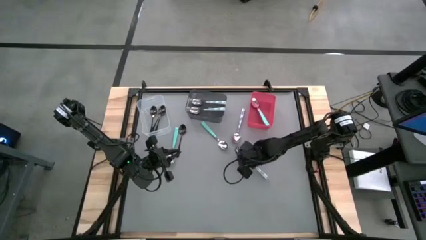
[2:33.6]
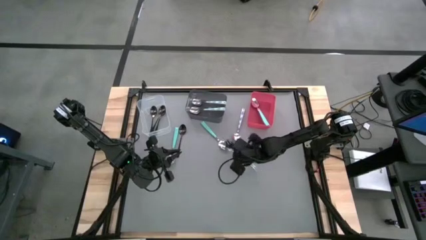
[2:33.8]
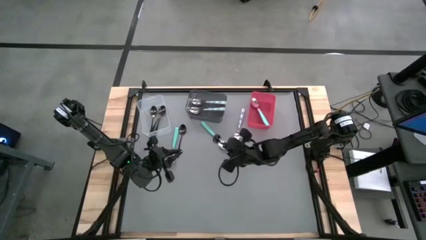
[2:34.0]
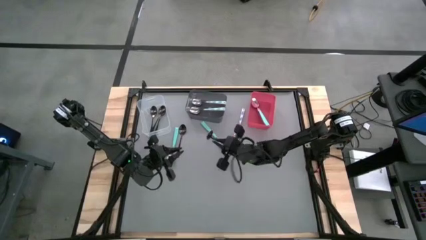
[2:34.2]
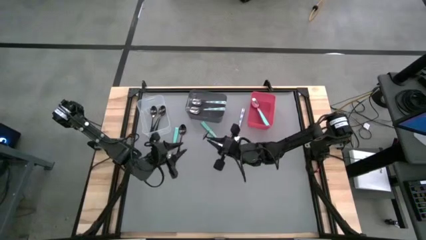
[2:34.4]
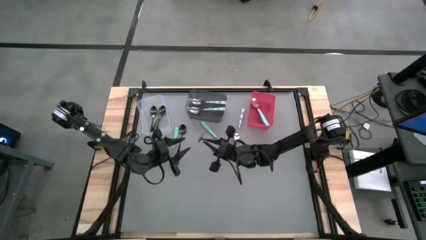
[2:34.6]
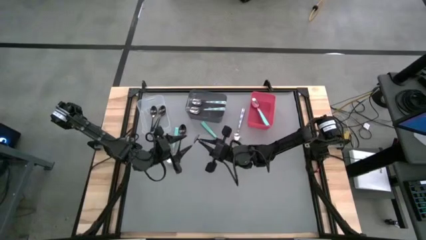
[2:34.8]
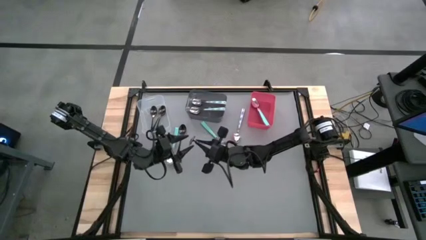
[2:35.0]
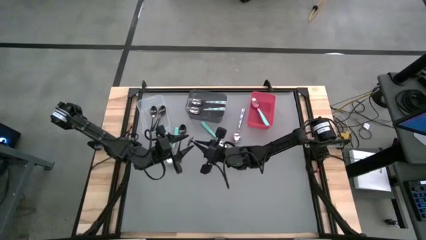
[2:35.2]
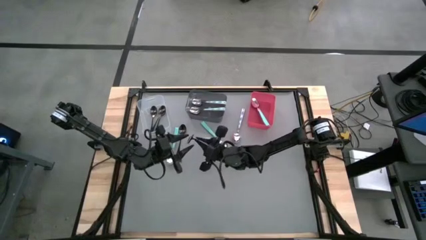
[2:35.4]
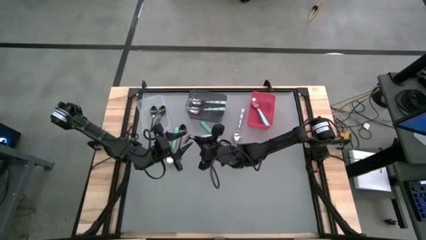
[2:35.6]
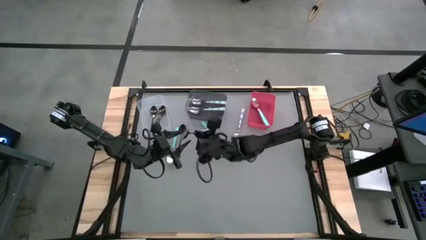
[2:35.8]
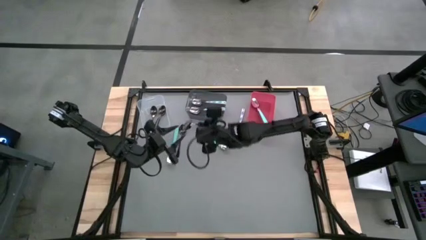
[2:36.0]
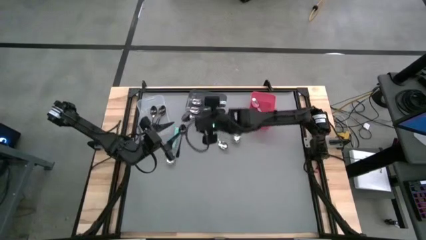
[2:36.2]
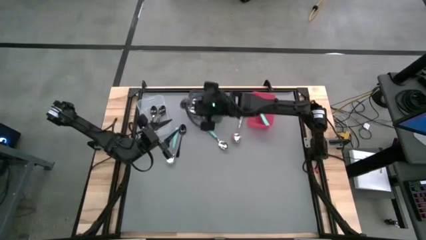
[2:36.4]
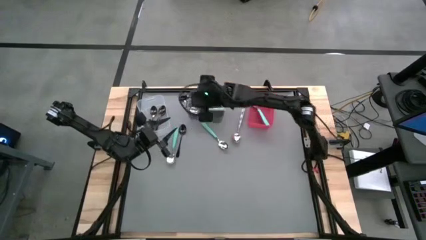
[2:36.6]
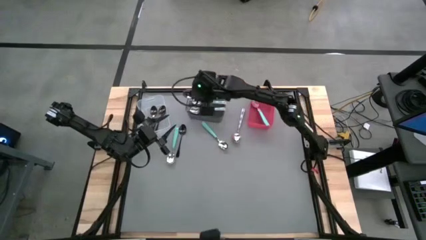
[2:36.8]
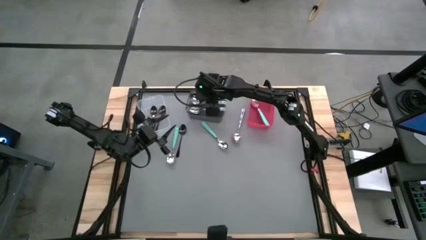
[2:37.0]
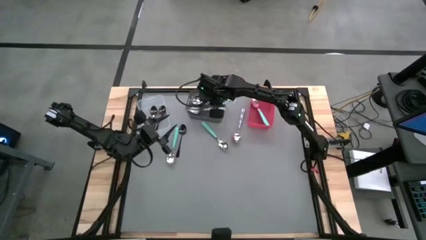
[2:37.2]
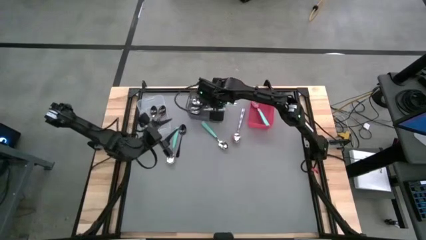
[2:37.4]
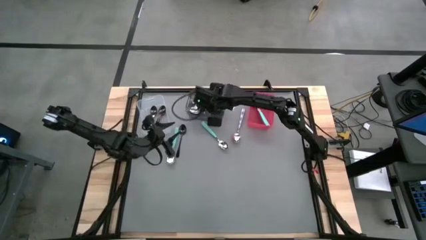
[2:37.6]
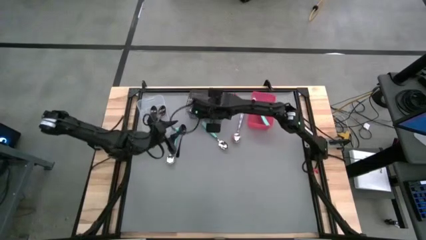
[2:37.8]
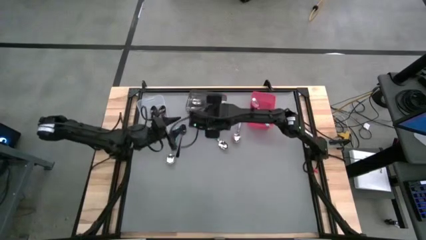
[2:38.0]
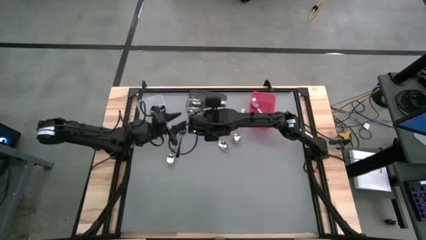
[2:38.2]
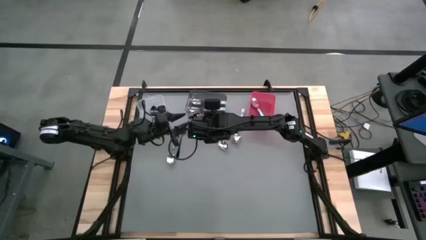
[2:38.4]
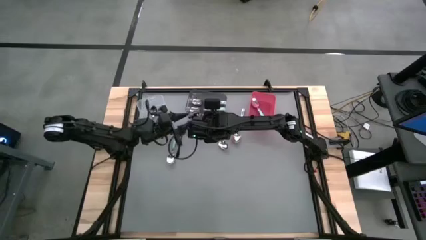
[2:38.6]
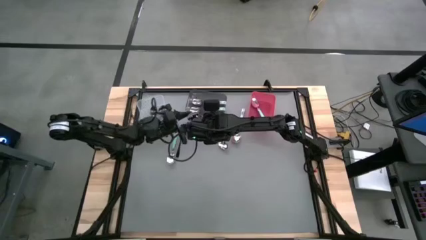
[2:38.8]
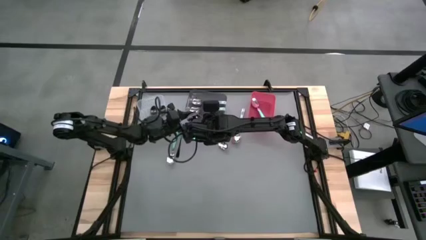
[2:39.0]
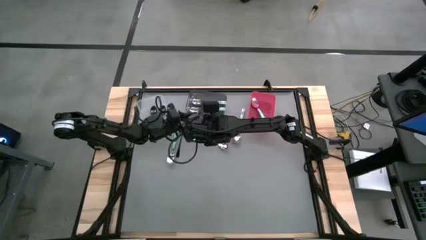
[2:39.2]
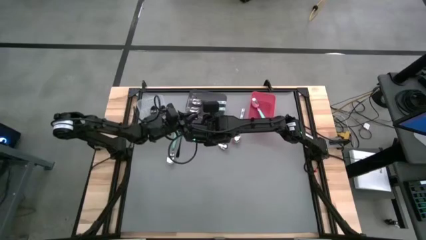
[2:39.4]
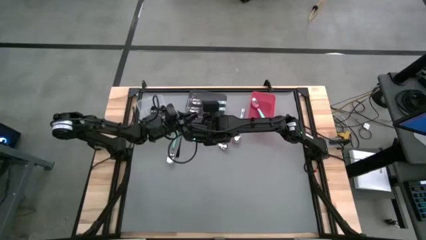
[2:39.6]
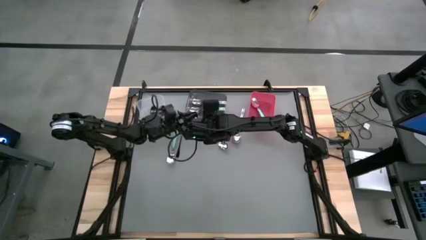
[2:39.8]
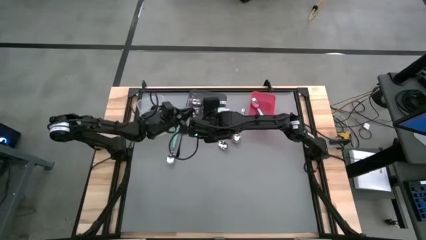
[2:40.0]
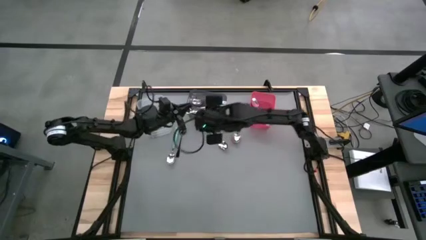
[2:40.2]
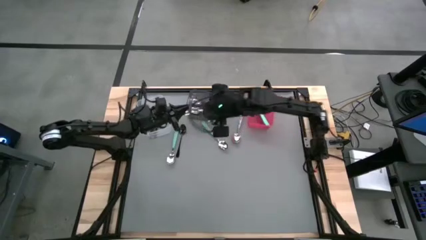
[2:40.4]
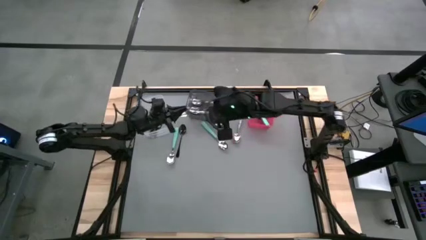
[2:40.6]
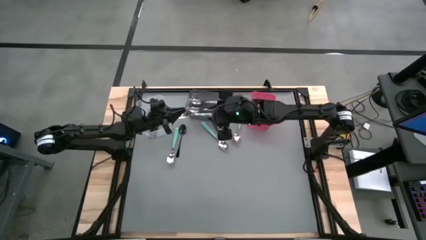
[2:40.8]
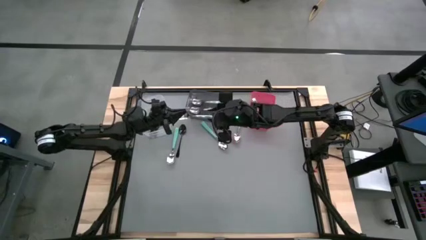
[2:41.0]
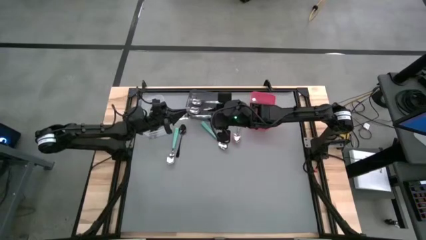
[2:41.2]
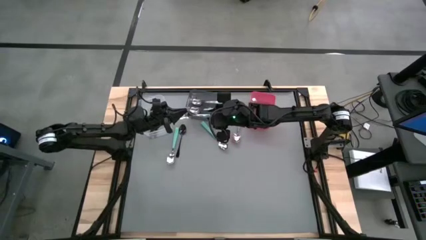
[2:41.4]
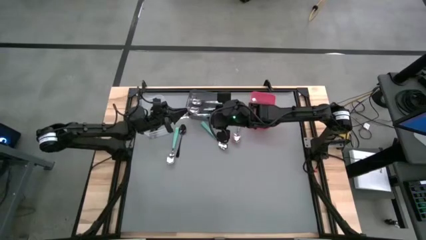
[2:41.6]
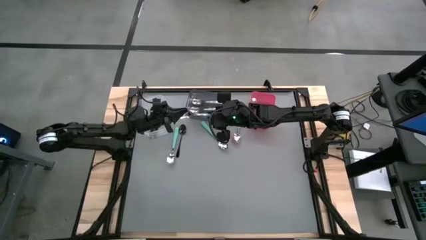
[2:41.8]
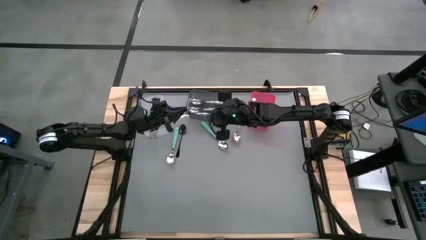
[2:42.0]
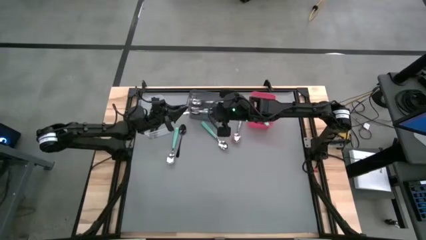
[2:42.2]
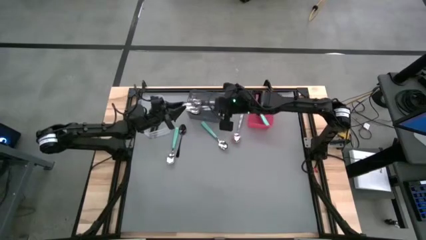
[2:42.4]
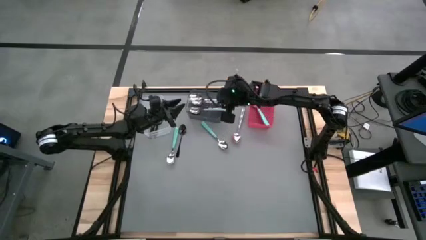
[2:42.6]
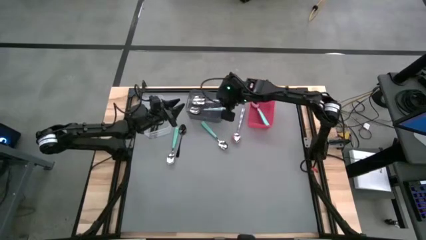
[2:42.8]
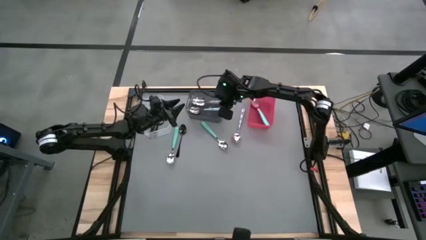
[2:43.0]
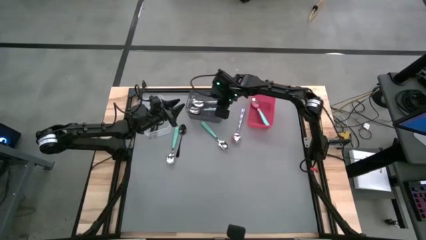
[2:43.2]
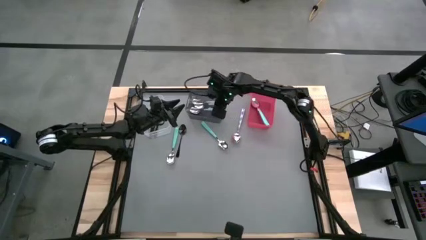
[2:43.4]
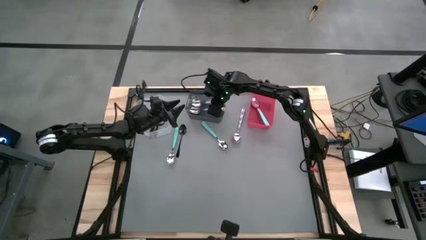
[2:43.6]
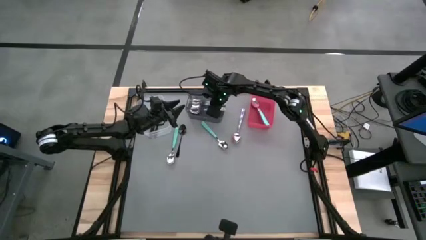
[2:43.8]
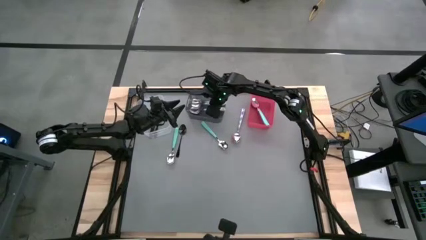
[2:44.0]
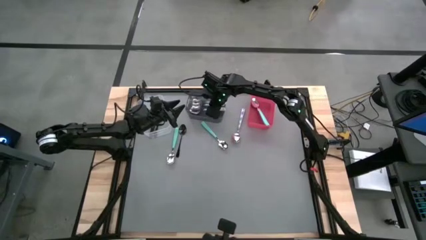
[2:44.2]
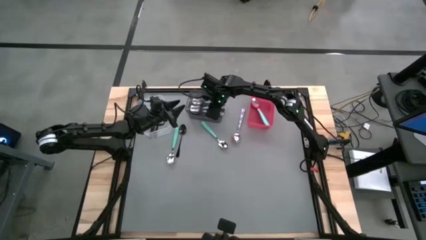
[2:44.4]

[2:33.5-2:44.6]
Task: Sort silverware by color (type)
Put the bottom blue patterned spoon into the black bin

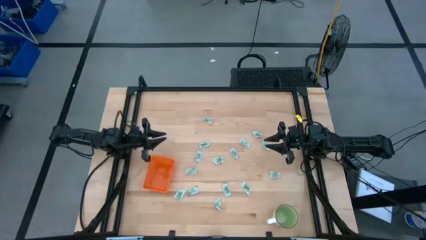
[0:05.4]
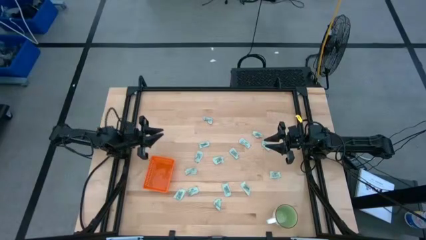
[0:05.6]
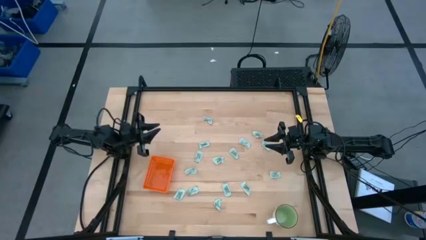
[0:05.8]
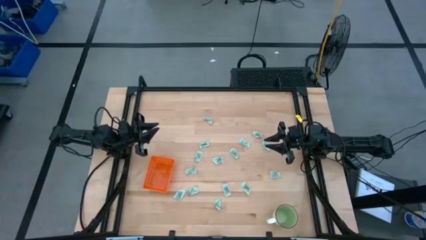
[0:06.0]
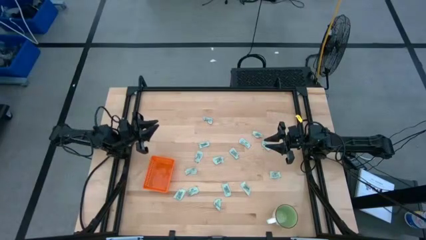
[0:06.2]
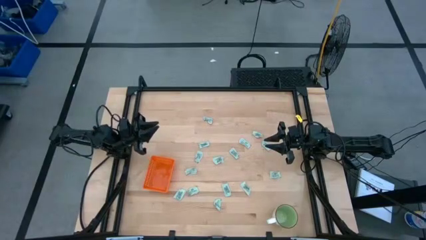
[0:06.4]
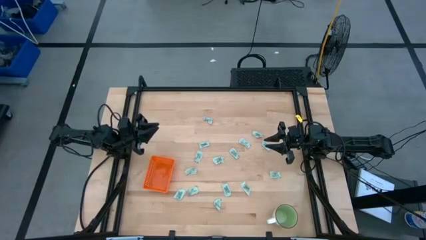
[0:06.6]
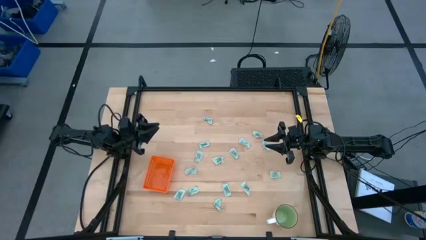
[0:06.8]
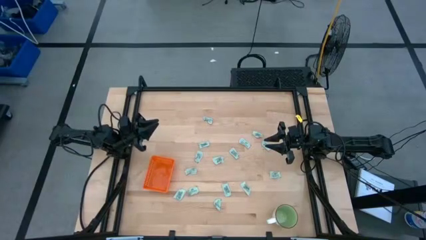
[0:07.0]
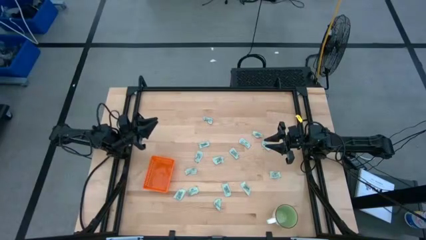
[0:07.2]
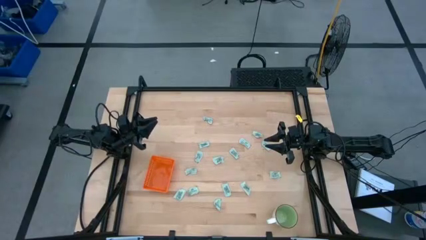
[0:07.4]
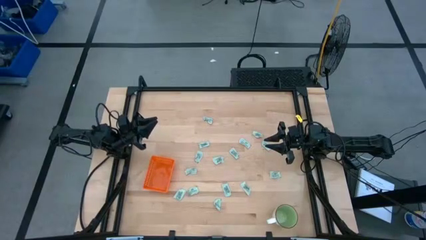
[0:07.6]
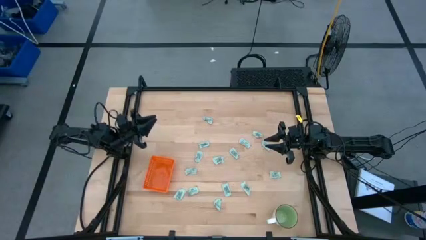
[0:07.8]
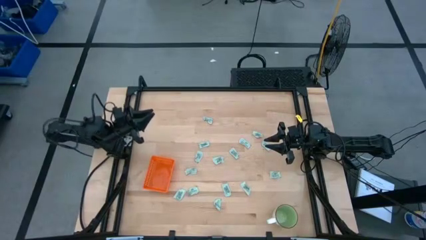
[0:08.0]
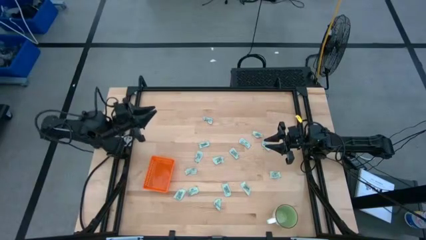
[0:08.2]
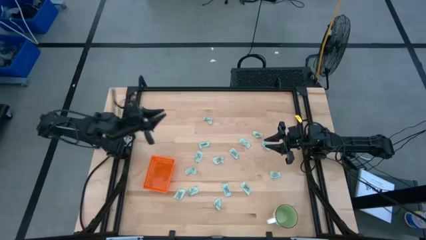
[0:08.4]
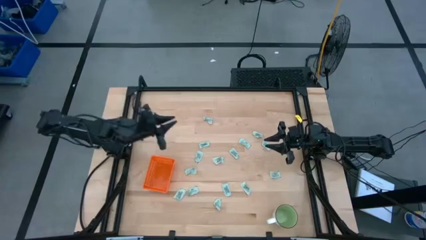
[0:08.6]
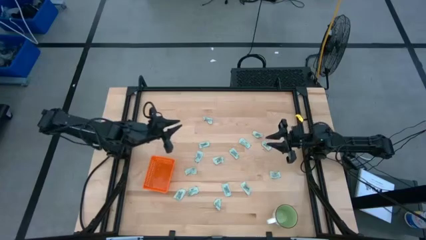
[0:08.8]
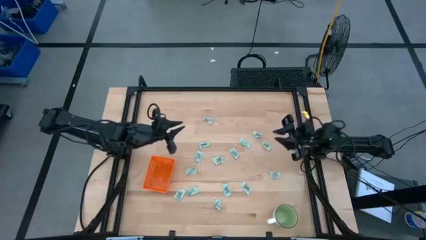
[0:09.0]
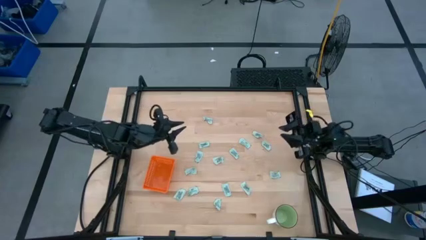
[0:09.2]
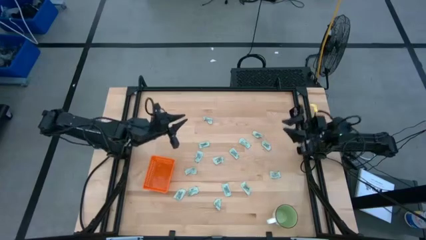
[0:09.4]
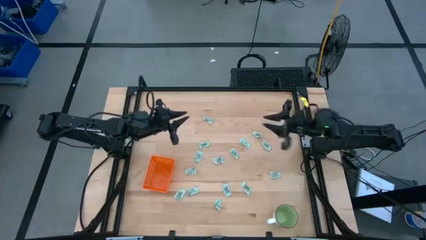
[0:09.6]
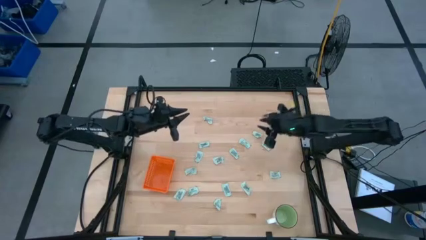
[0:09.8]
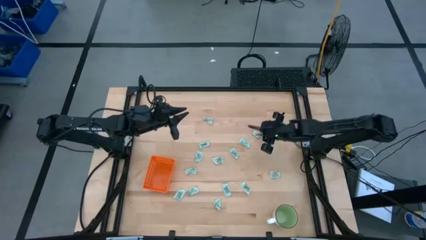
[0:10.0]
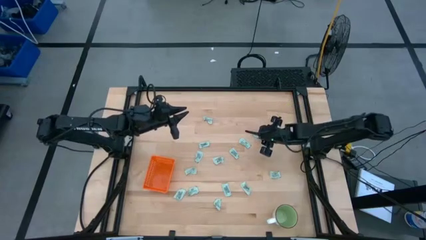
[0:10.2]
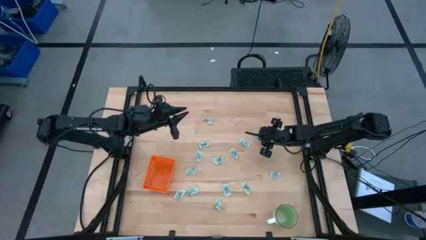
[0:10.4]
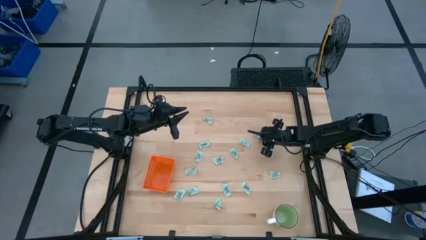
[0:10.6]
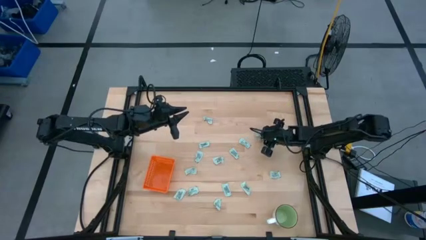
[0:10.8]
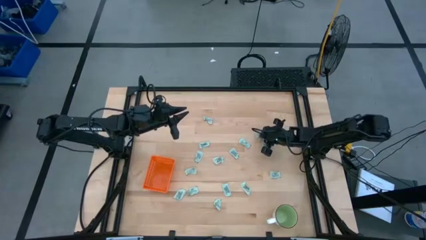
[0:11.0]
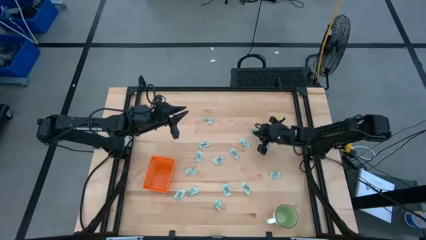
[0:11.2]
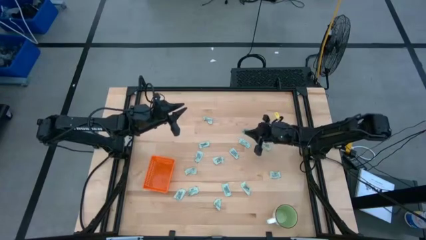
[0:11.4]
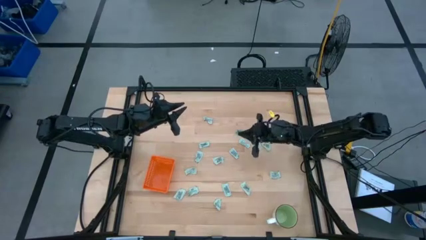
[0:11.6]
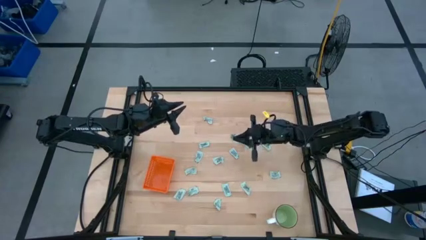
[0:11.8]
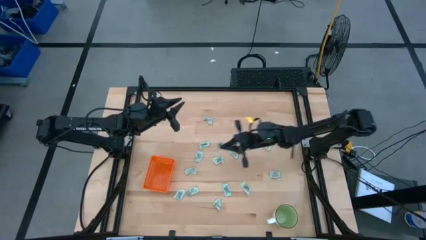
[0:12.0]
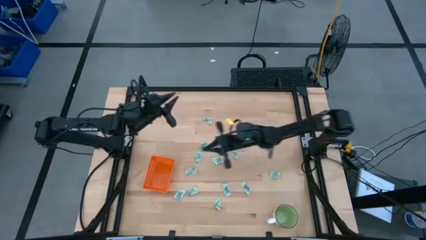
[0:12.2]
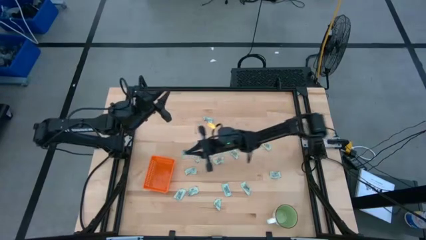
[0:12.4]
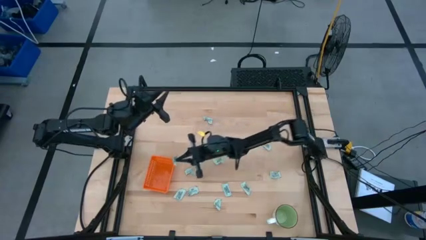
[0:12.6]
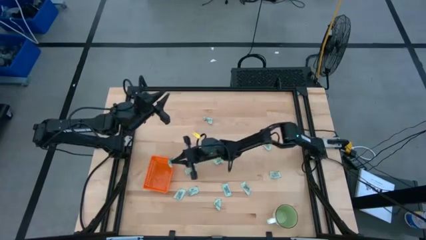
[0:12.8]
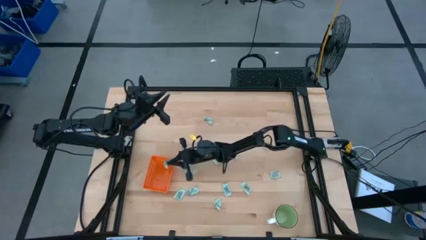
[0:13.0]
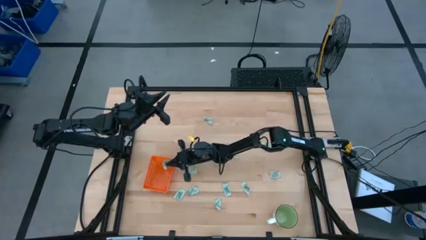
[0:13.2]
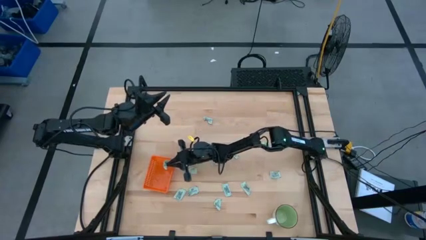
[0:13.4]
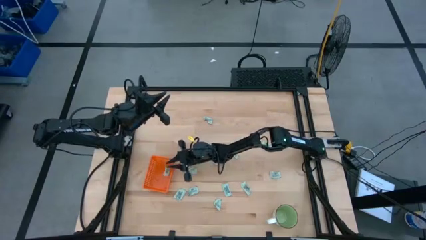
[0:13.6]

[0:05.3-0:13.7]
Task: Pick and place Stevia / Truvia into bins
Put the white stevia packet into the orange bin
